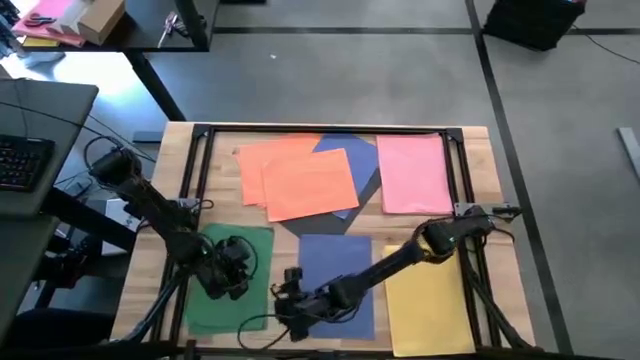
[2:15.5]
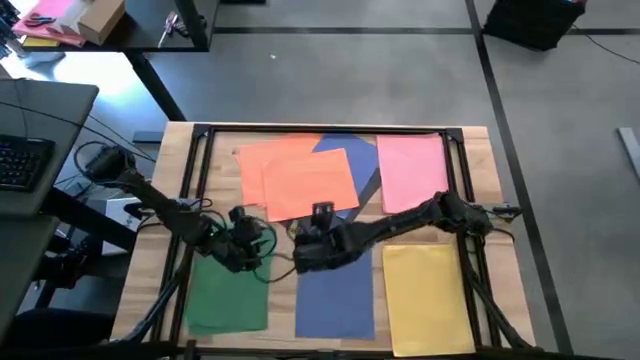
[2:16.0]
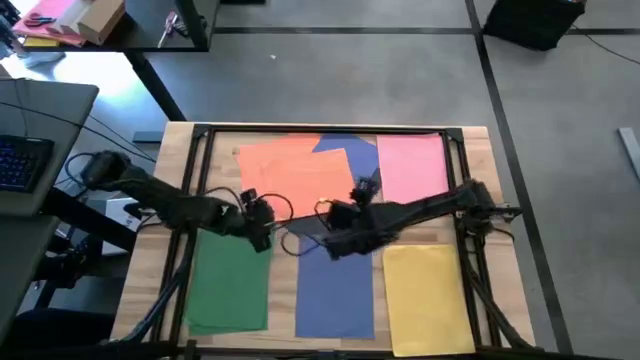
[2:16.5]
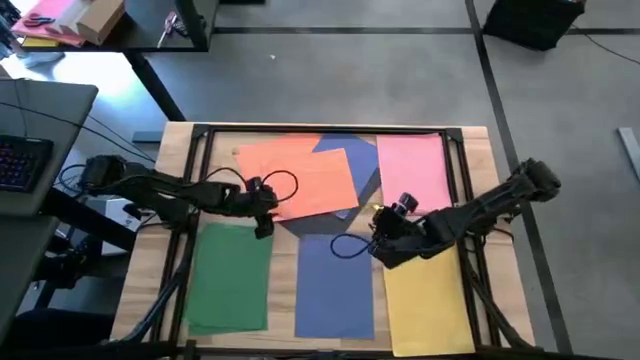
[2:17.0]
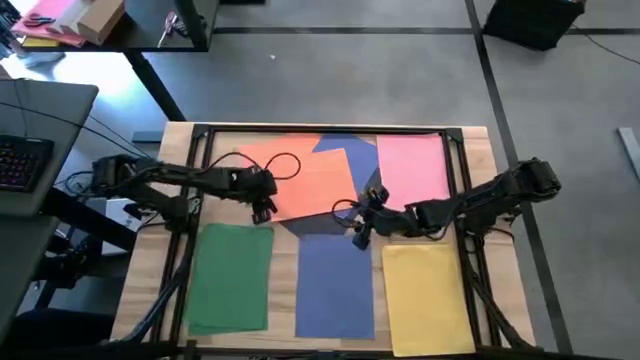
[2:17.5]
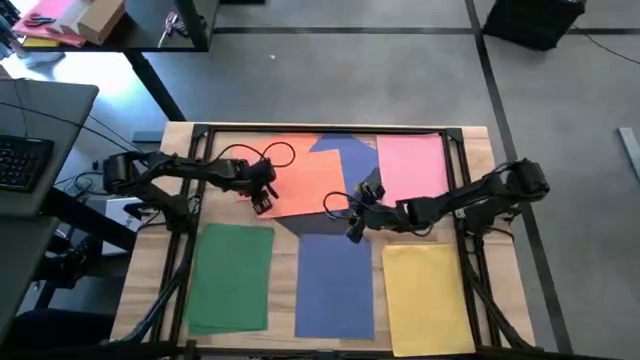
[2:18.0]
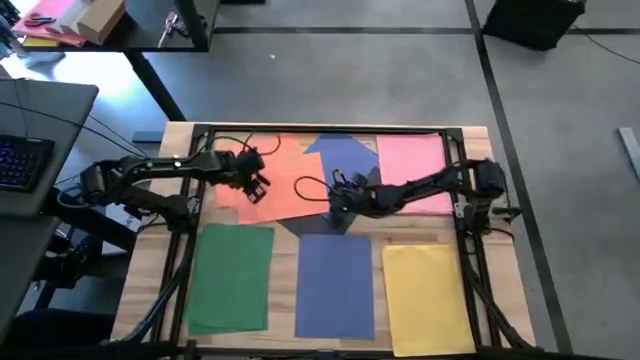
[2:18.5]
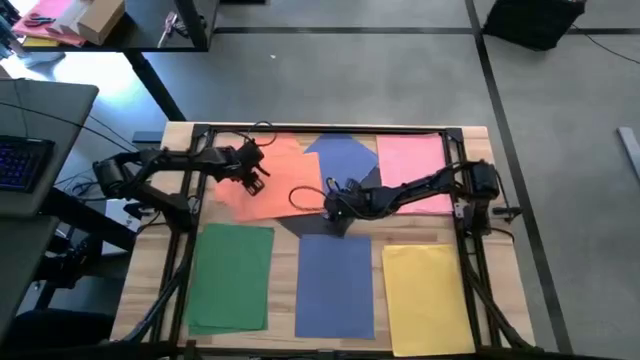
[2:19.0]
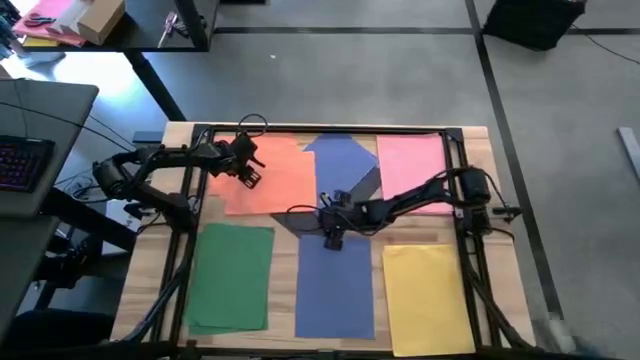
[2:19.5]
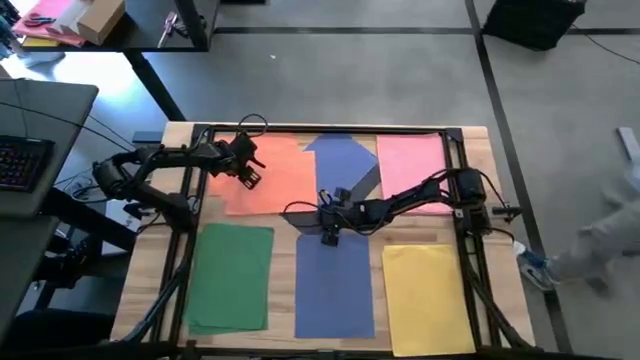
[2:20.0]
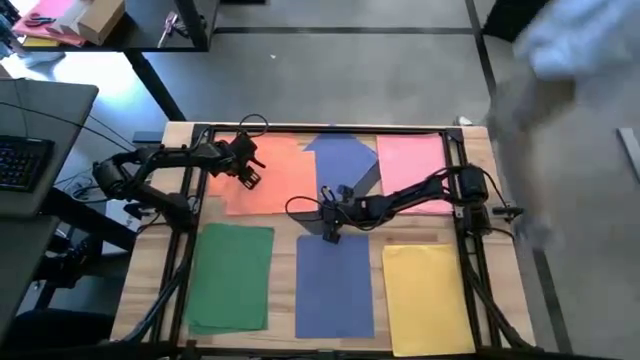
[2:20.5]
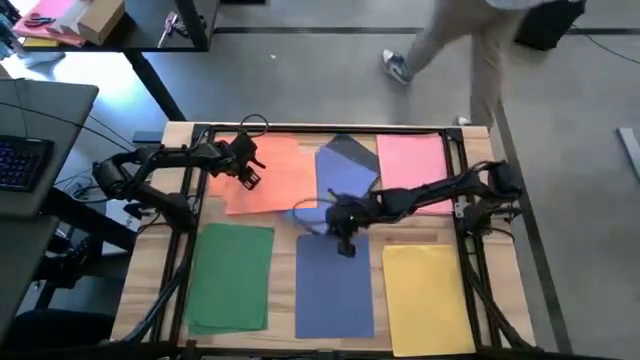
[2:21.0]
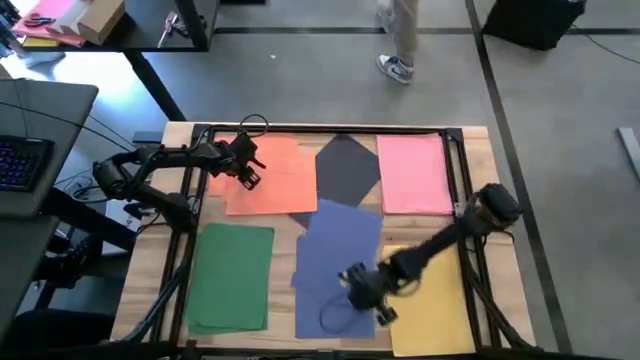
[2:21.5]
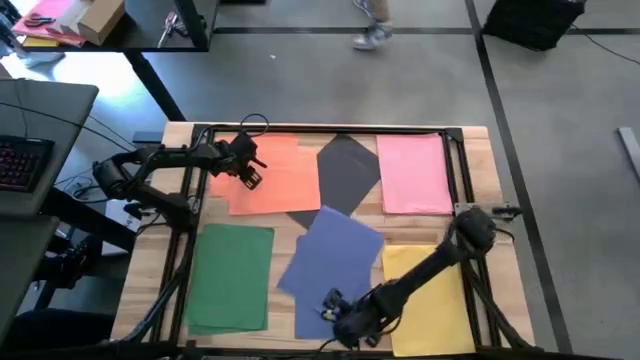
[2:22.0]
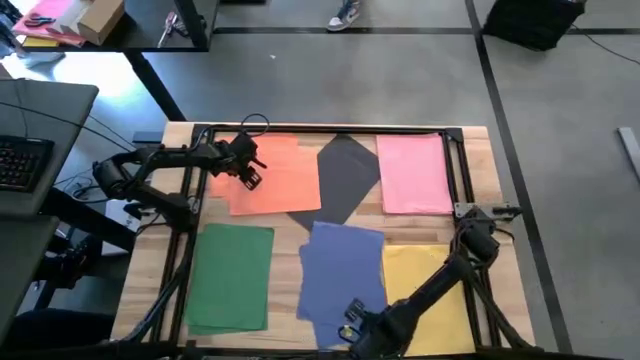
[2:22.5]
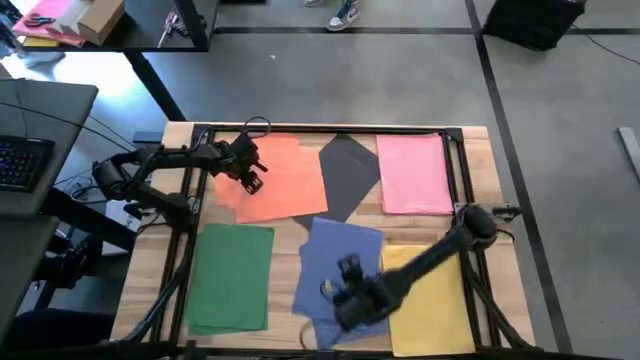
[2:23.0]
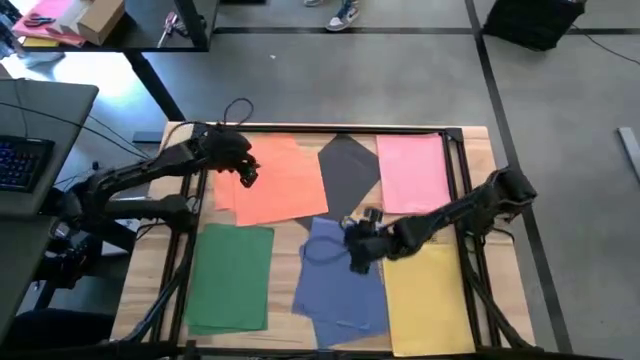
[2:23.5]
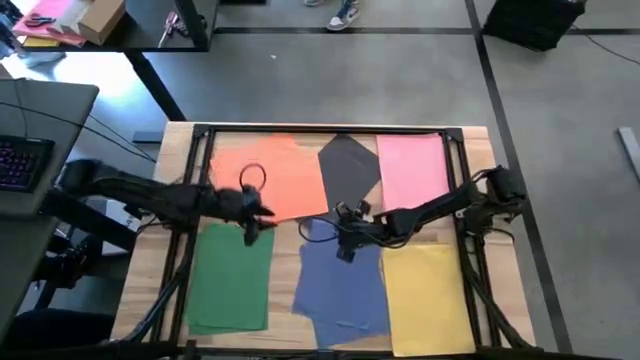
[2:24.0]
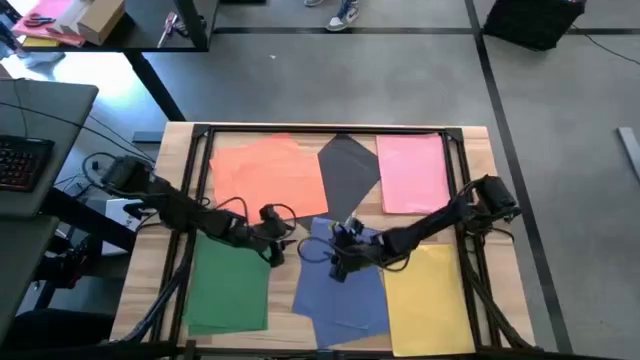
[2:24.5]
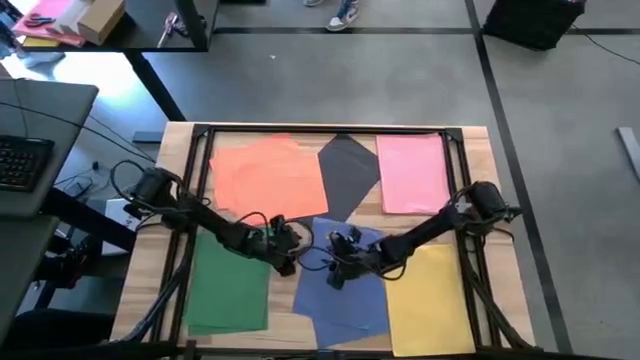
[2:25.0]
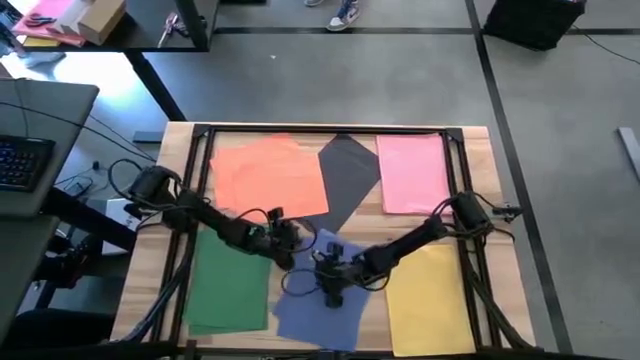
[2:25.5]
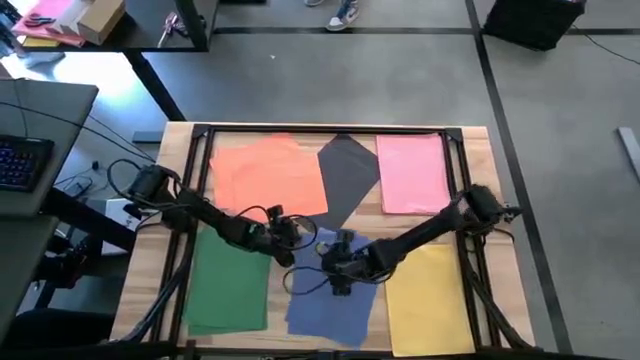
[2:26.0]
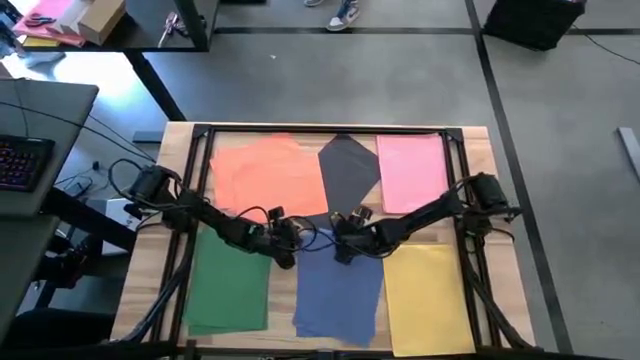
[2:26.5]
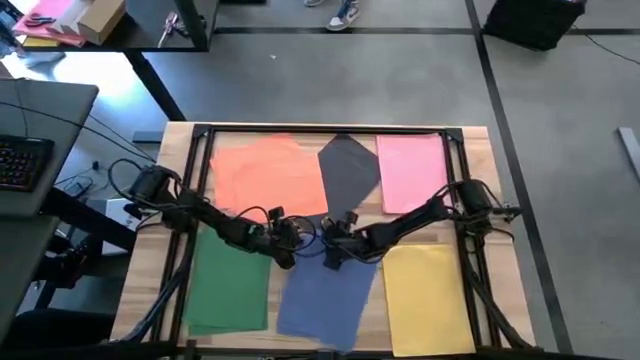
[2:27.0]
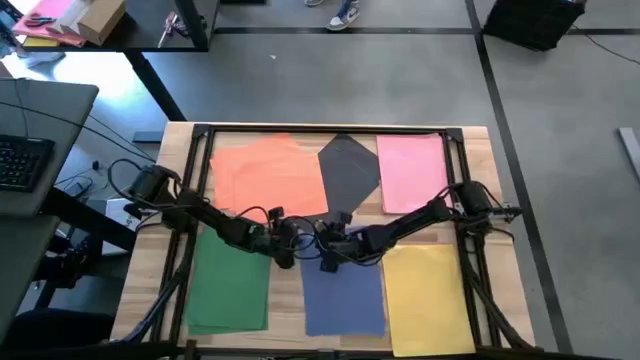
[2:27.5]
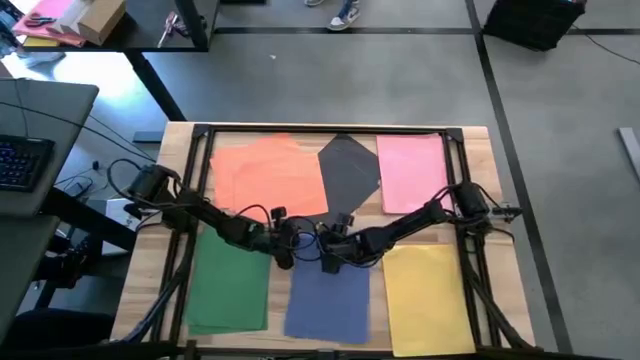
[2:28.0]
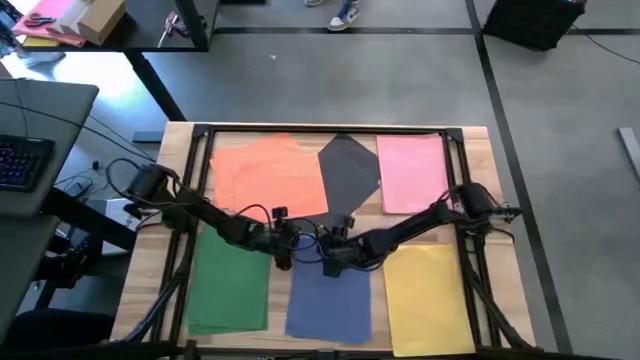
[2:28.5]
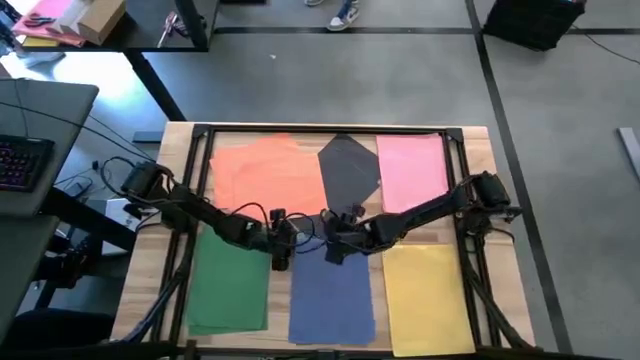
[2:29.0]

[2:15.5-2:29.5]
Task: Organize paper
Stack the blue paper on top of the other blue paper to the bottom middle of the table

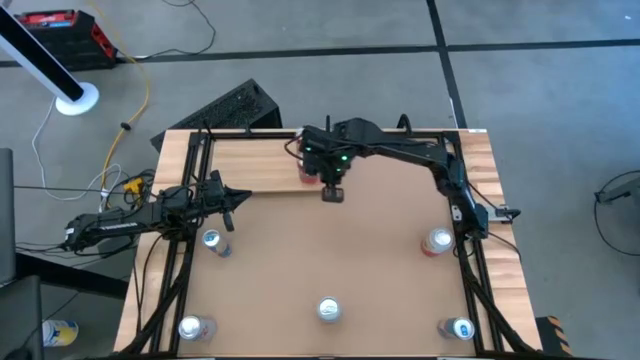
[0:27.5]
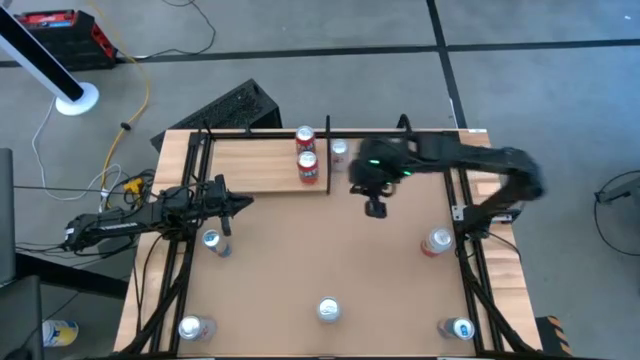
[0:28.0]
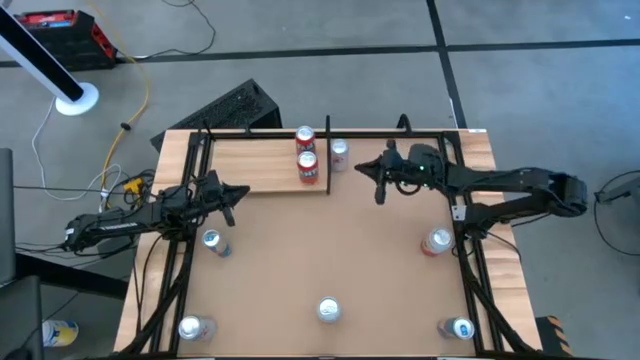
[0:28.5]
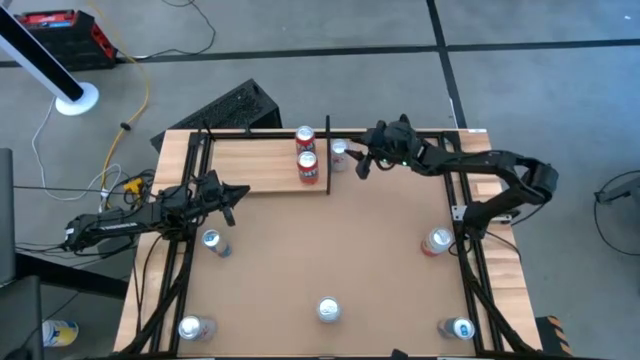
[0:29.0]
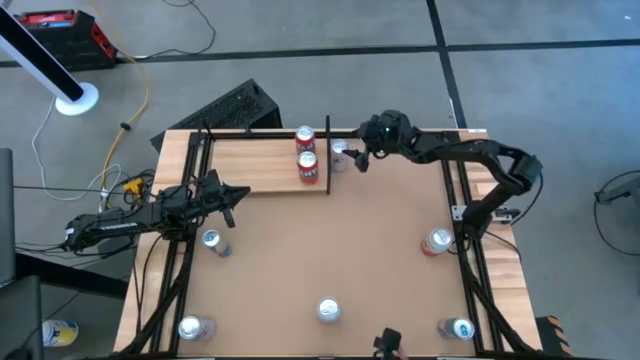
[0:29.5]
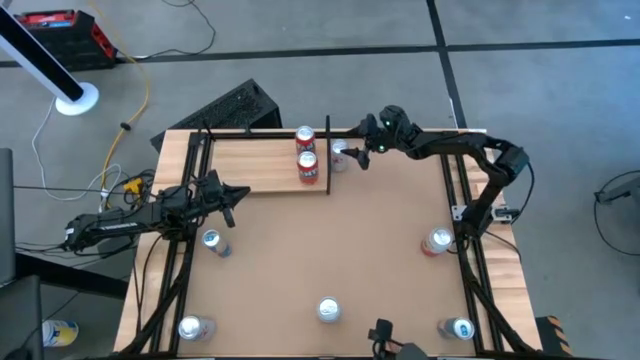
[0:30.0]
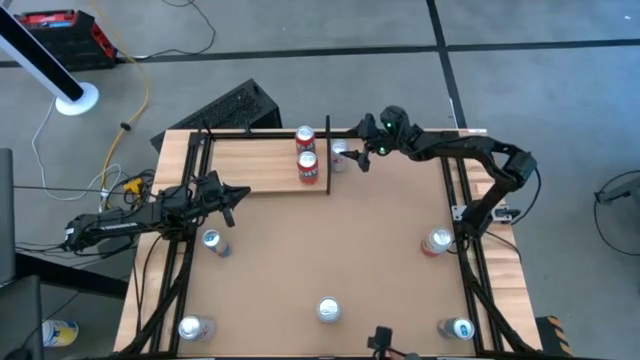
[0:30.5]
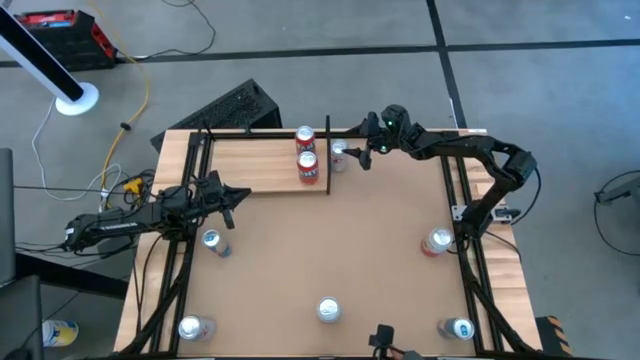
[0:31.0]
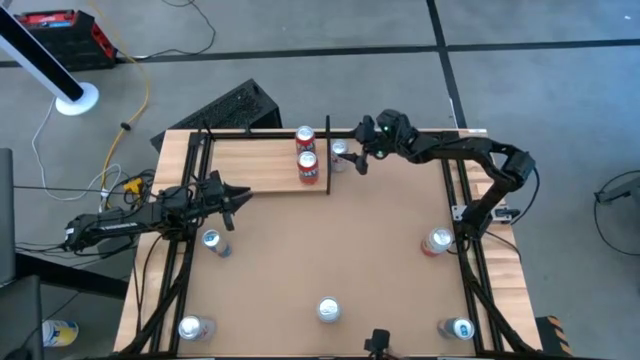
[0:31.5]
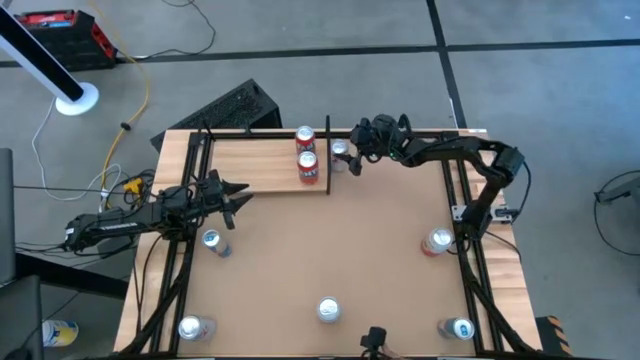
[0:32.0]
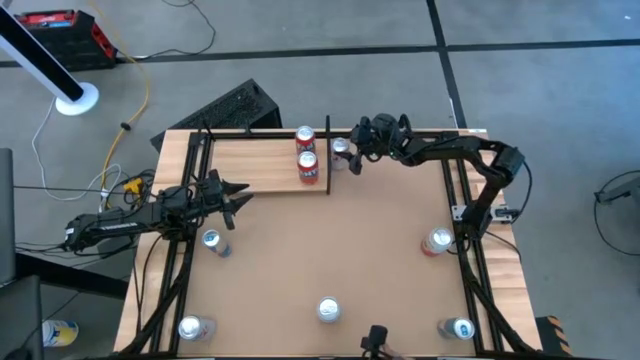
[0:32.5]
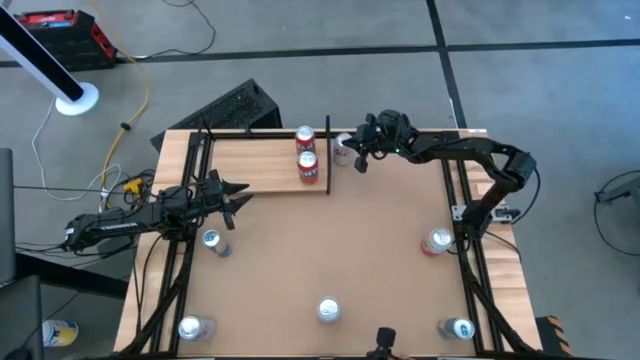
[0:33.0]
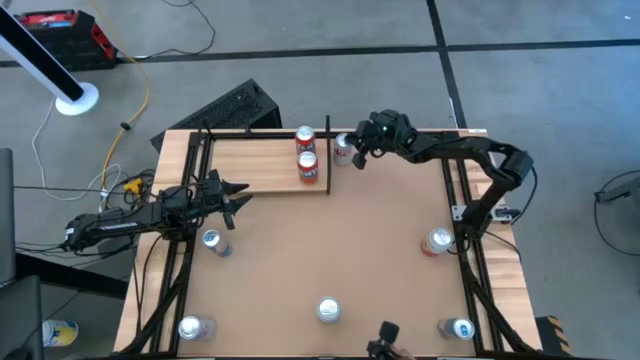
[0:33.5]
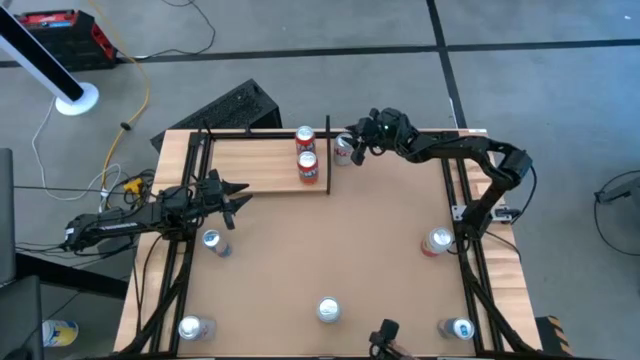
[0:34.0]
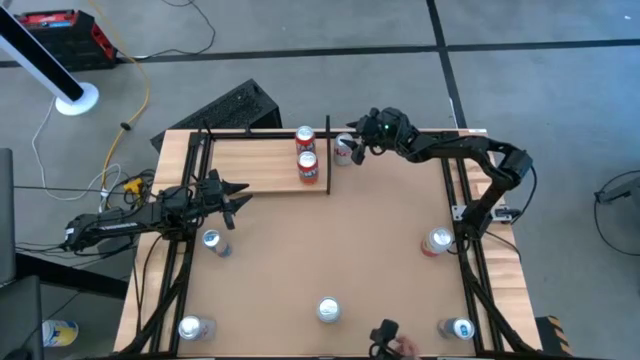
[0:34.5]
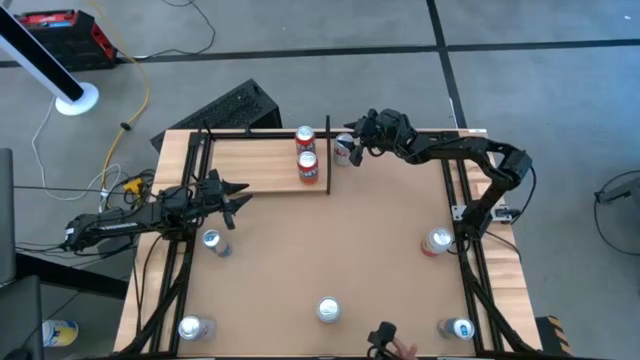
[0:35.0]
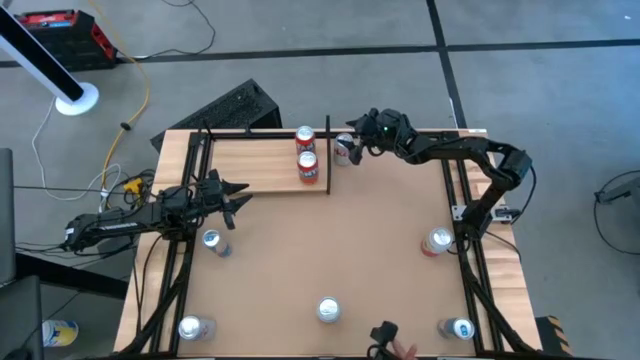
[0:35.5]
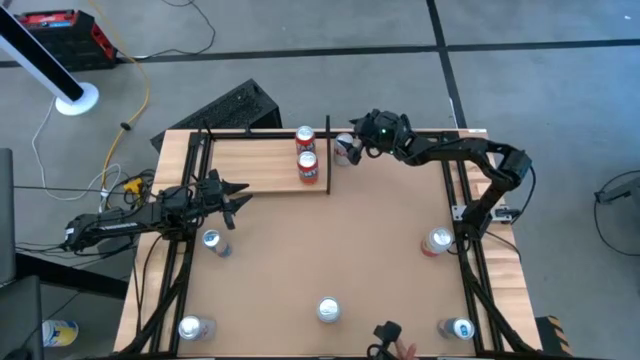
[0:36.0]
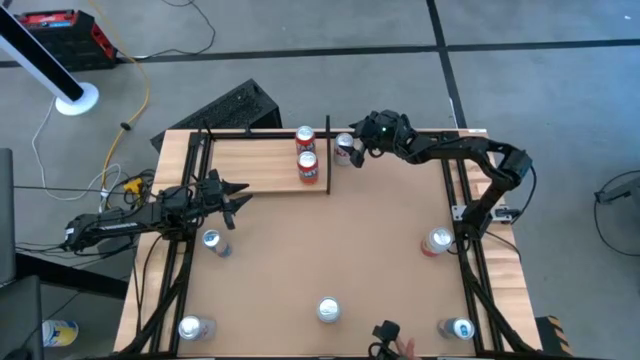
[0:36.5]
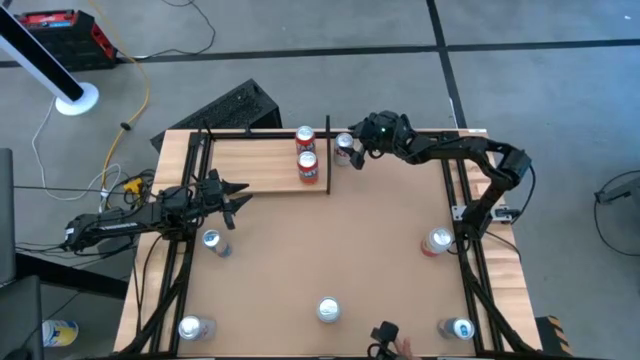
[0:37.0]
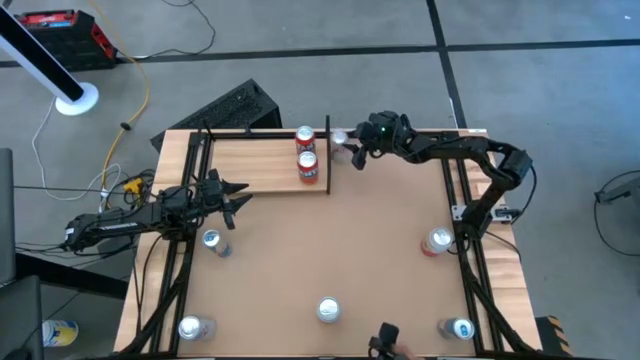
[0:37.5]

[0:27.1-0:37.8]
Task: Place canned beverage on shelf
Put the top red-silver soda can on the shelf
